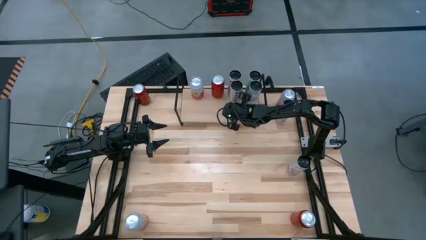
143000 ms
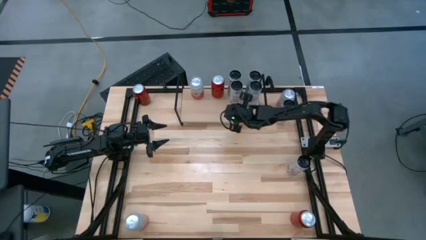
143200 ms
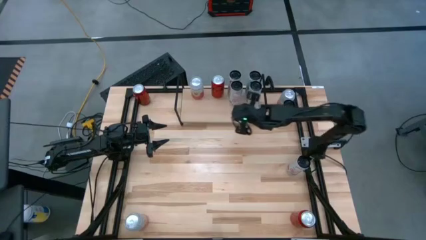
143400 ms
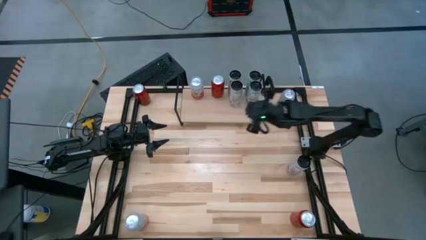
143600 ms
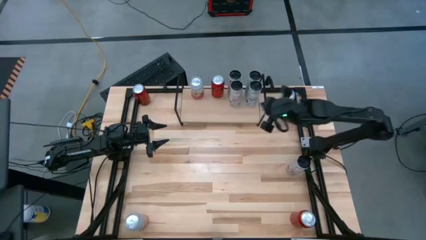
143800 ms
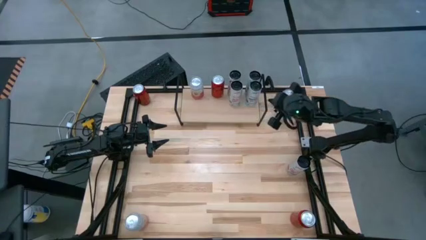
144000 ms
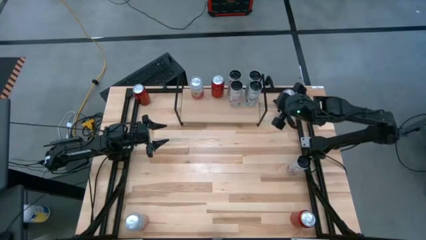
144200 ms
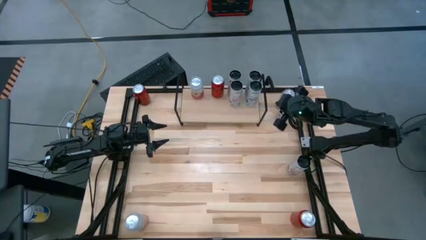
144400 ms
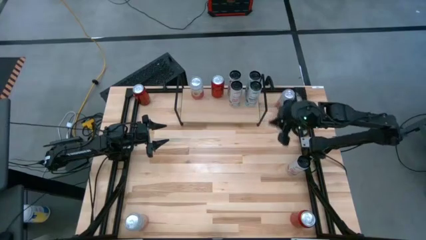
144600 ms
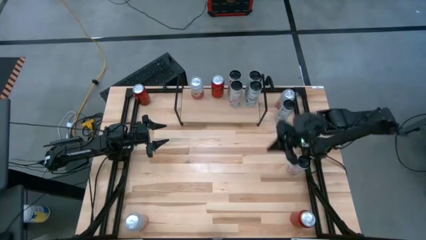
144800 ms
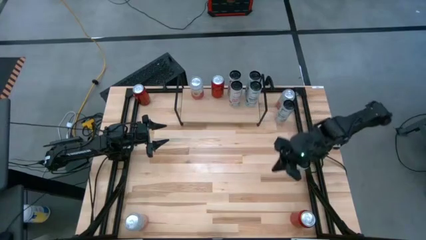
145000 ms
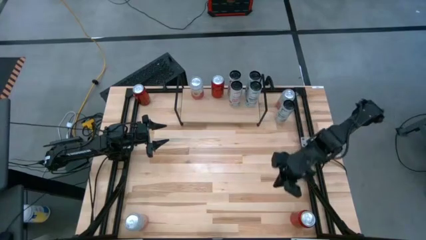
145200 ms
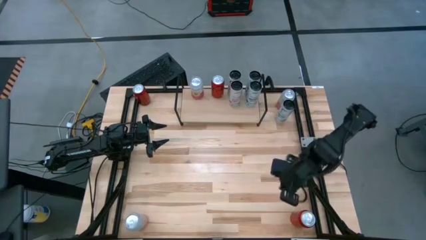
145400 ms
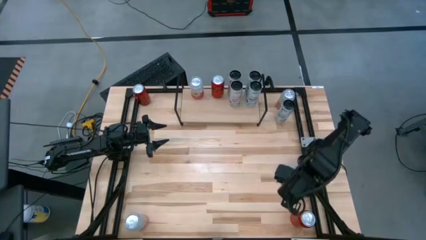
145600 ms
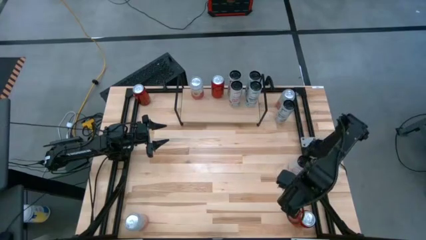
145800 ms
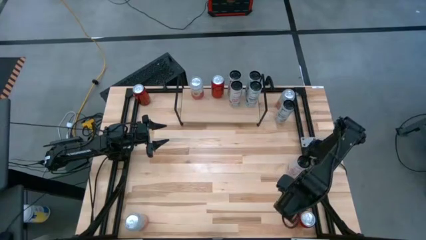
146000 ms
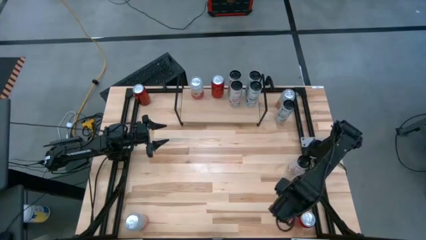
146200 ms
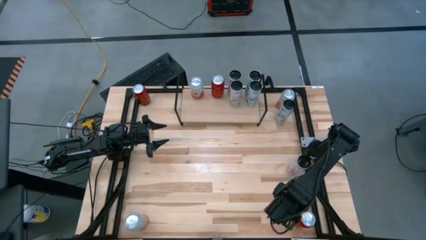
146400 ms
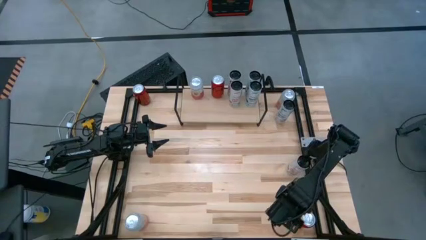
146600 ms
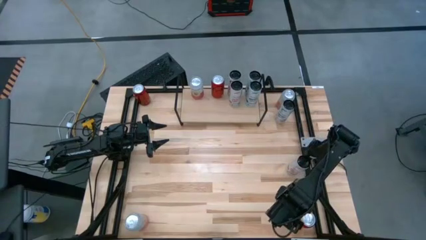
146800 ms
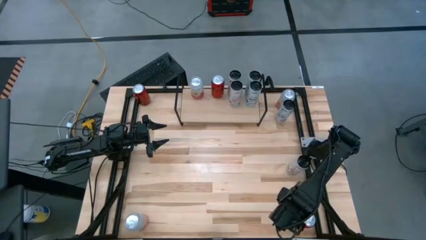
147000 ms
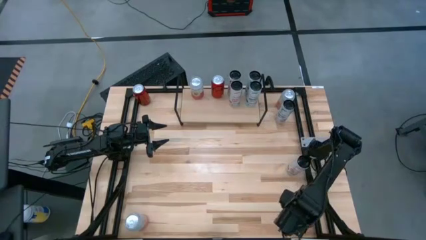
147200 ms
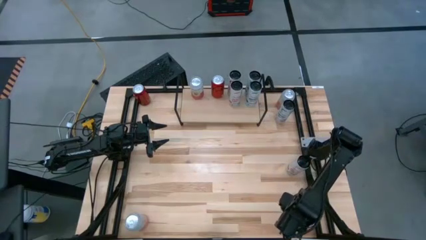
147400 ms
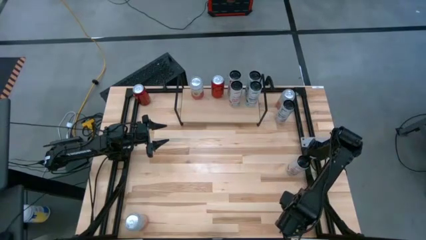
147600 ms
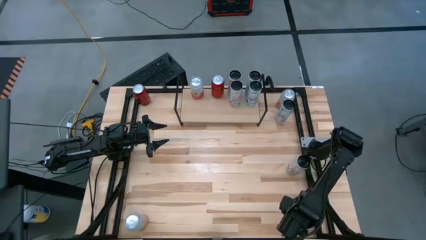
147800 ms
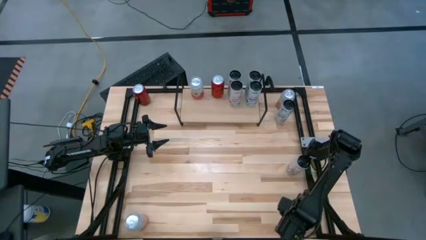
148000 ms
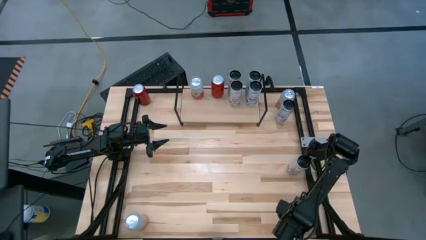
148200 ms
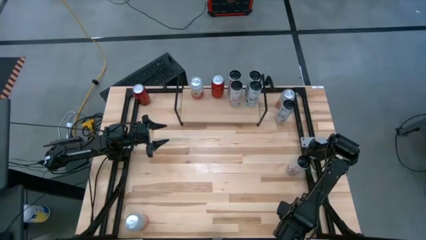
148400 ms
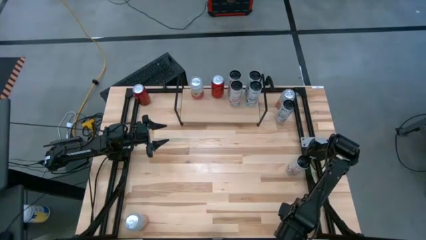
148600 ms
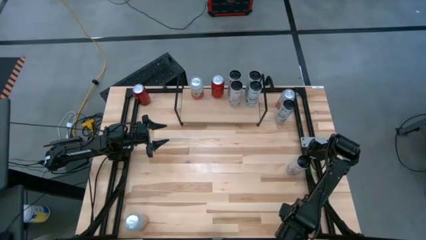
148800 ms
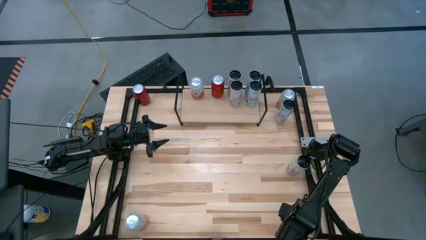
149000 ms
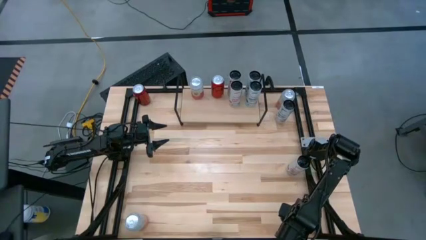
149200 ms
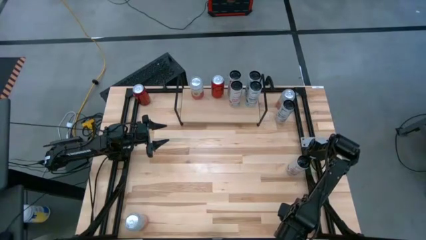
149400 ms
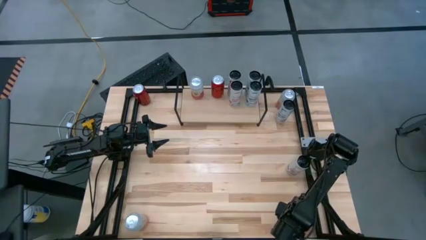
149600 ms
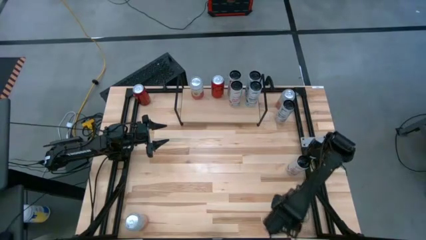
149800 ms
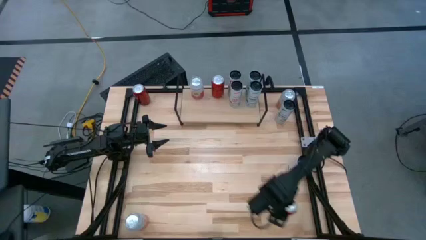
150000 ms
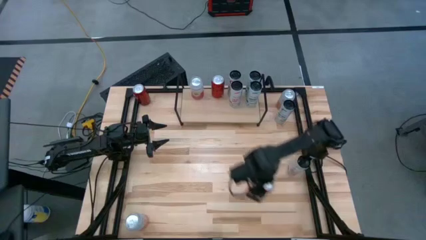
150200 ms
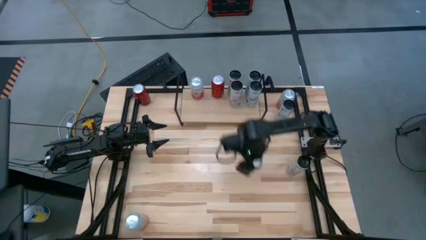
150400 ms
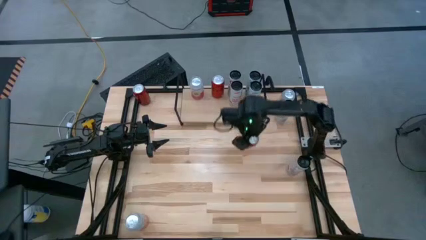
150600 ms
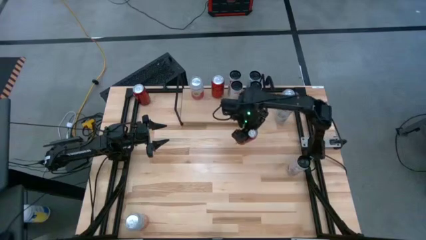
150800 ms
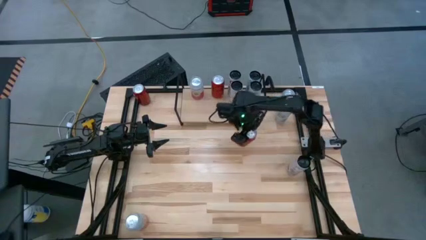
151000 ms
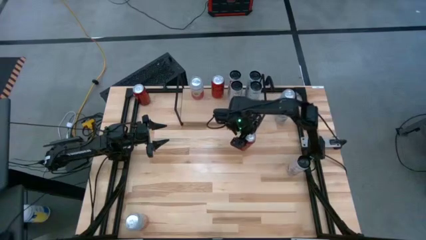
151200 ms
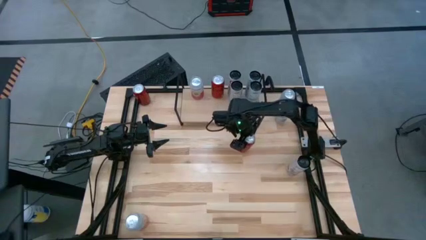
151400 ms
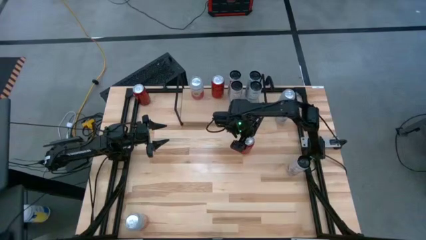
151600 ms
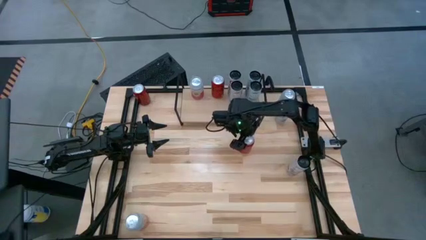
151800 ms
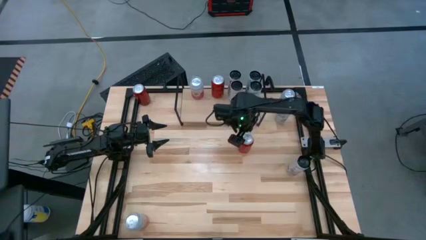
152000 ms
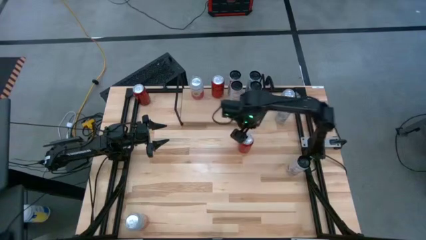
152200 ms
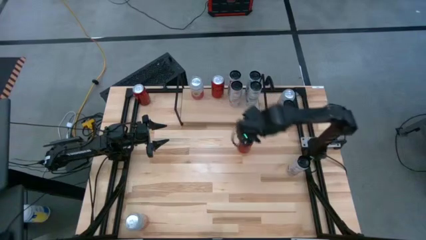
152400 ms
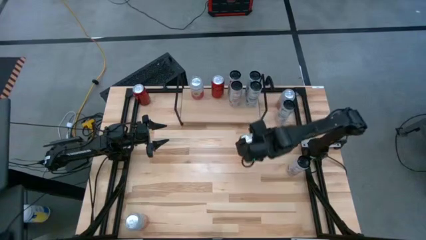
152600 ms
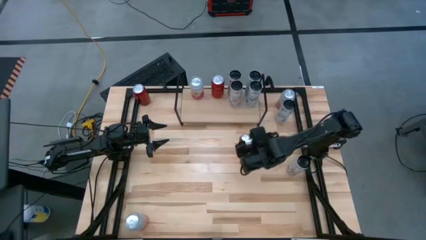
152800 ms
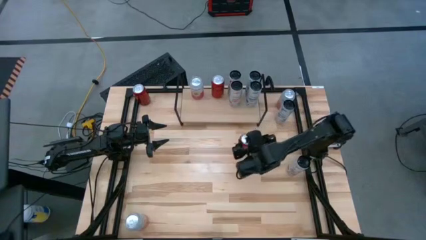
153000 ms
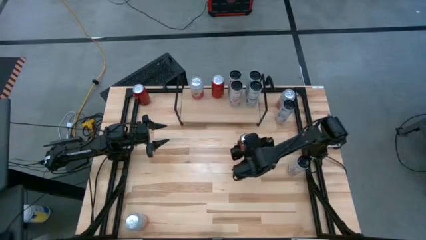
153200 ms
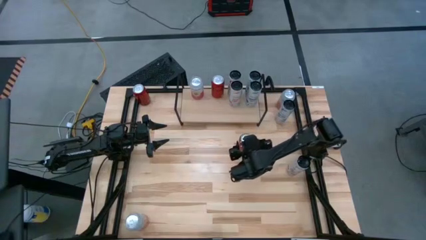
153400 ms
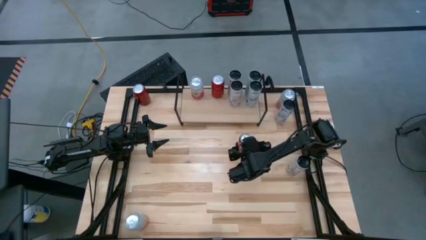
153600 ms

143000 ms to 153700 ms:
Task: Place canned beverage on shelf
Put the bottom red black soda can on the shelf aligned with the other red black soda can

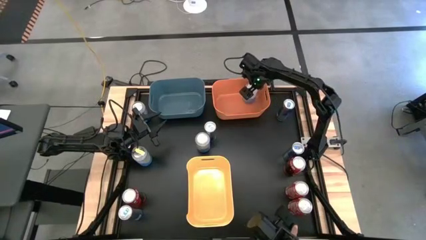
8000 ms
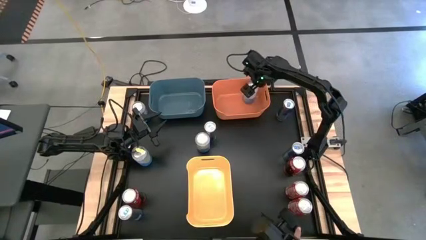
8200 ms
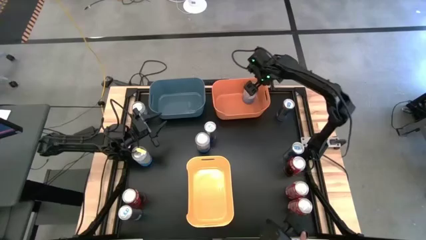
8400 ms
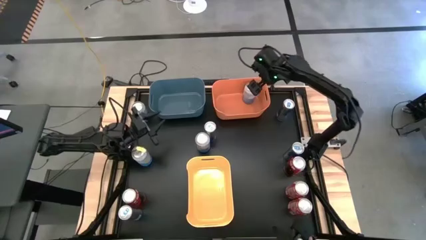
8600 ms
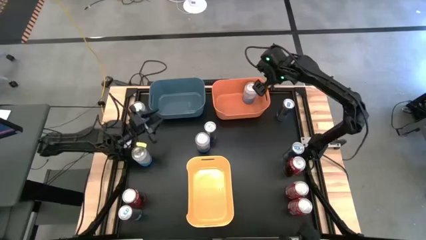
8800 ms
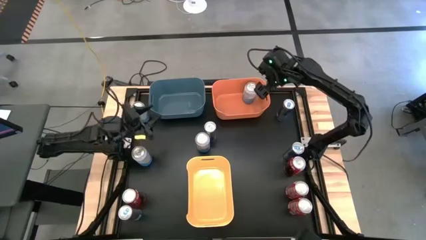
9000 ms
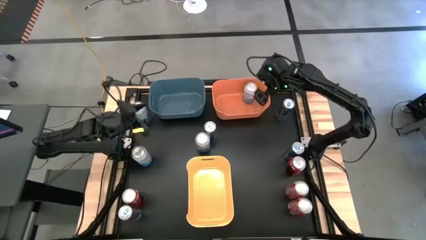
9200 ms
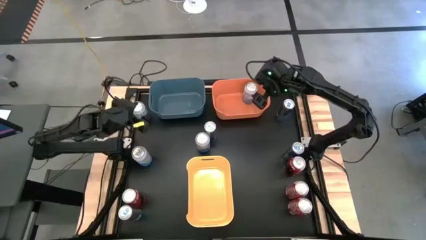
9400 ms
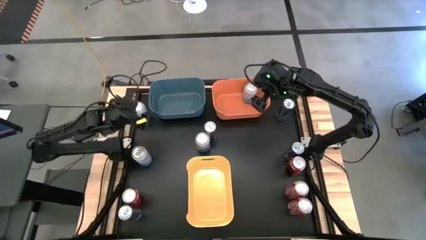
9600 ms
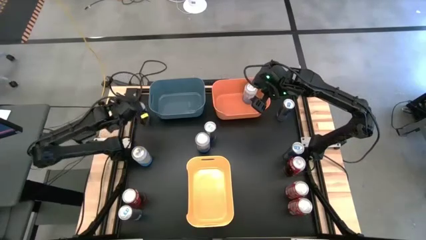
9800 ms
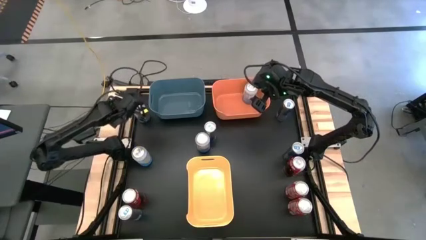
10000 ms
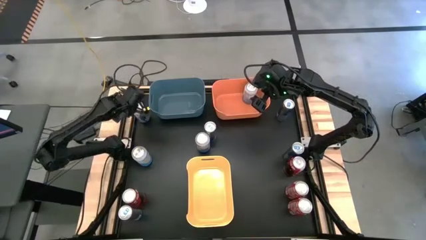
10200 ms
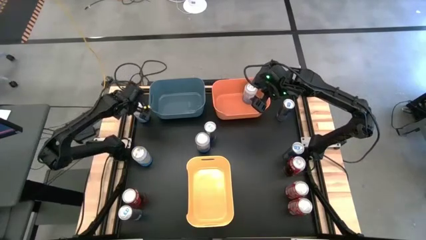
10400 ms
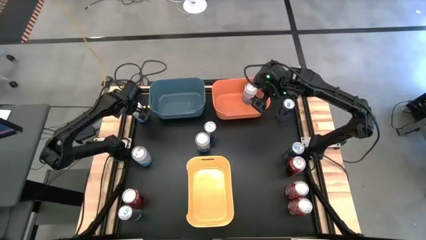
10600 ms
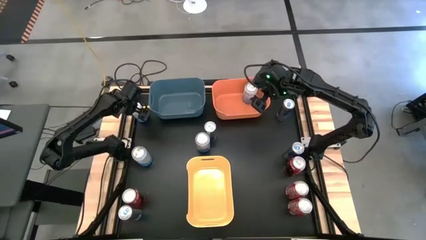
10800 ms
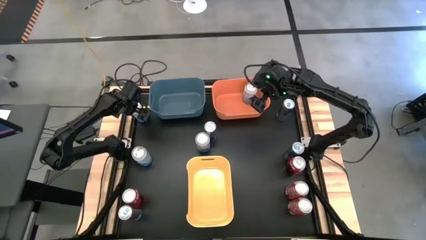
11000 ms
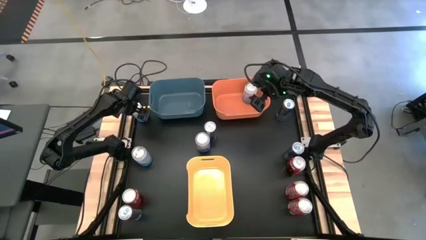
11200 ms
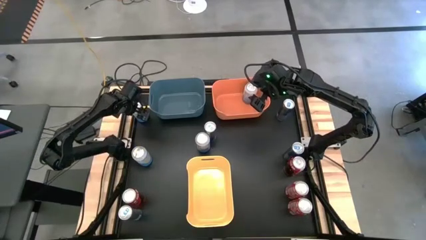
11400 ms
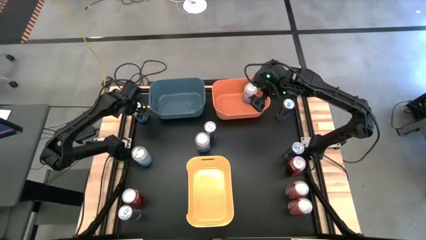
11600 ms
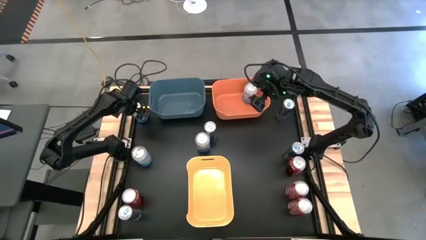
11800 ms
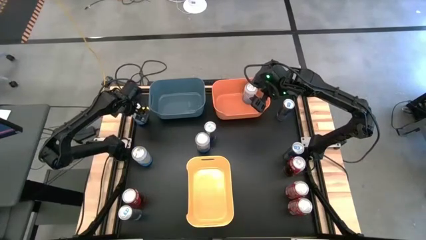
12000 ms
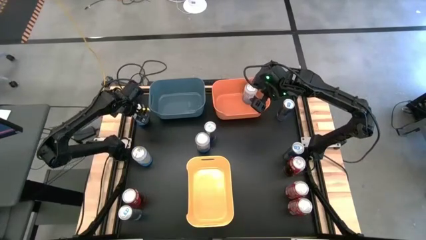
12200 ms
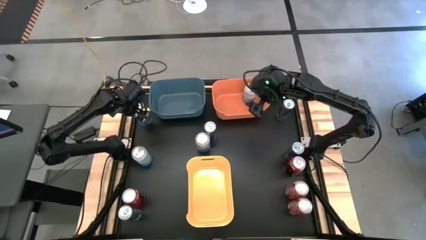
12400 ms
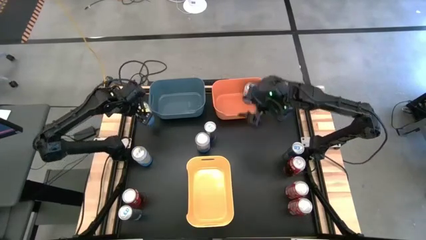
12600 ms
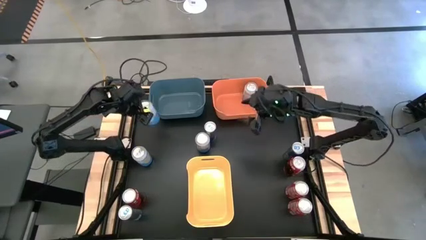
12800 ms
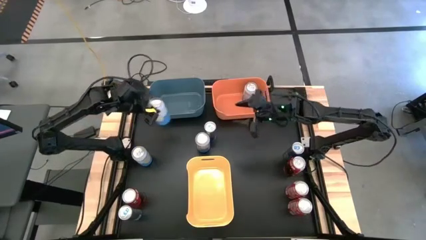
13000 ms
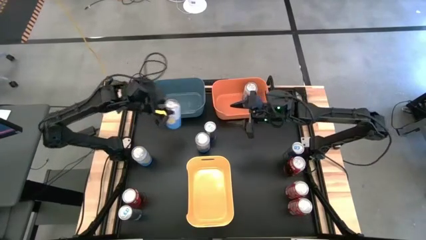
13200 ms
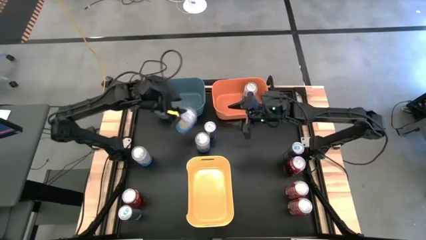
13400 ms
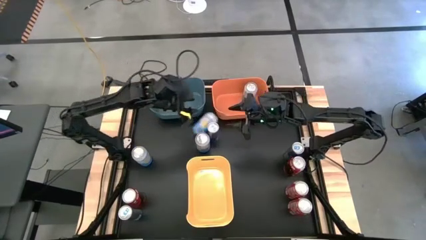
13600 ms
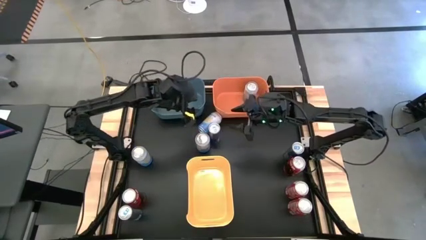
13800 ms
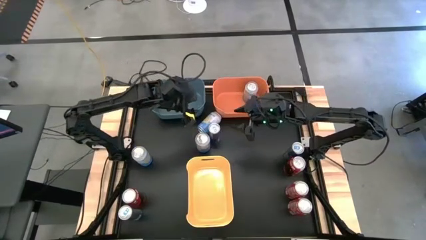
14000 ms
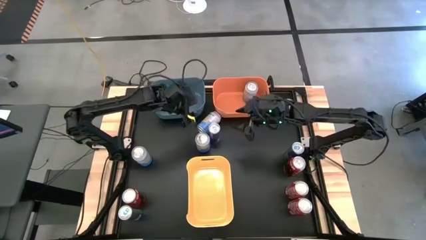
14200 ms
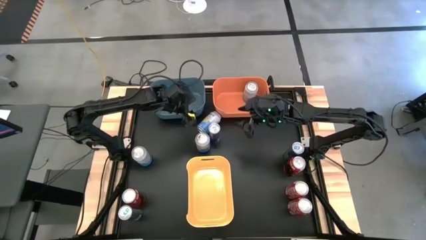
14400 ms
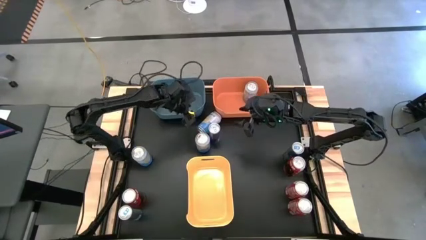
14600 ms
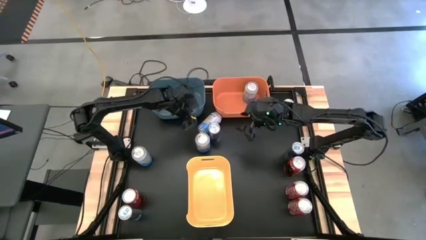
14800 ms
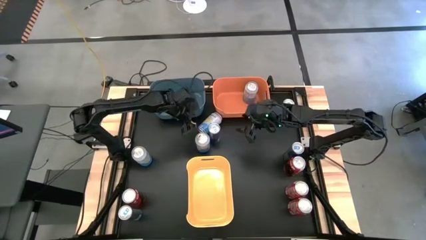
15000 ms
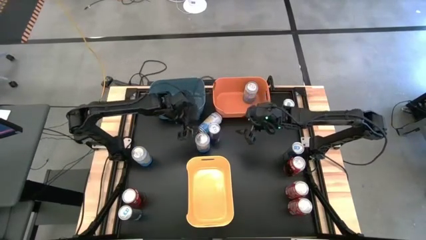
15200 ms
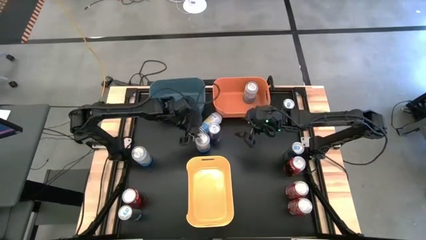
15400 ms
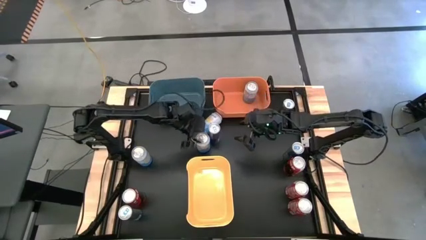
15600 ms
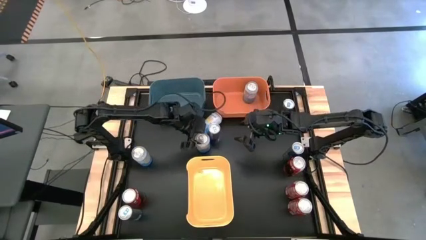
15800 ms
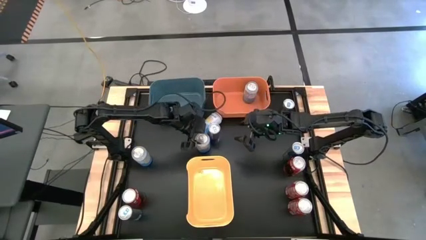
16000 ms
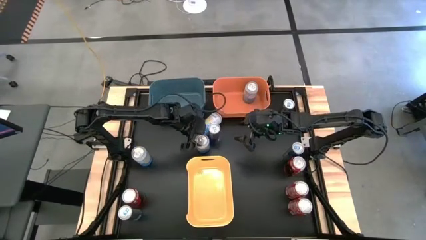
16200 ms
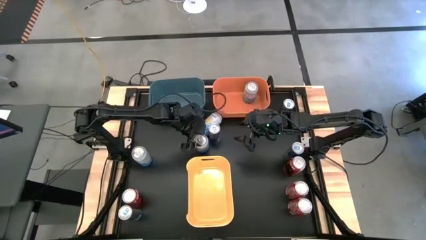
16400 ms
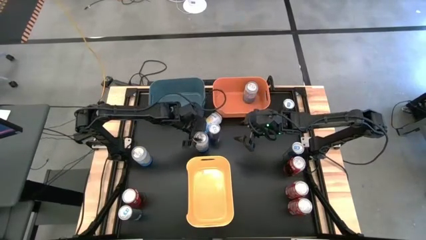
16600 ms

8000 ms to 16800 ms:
Task: Sort soda cans
Put the blue white soda can into the orange bin
